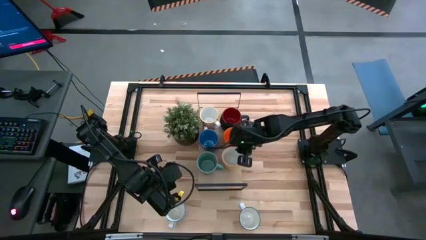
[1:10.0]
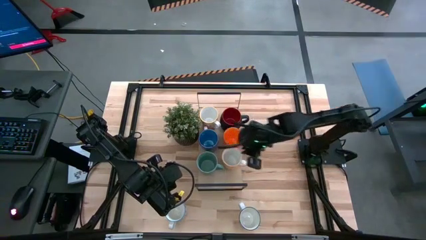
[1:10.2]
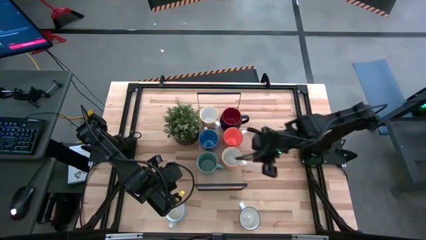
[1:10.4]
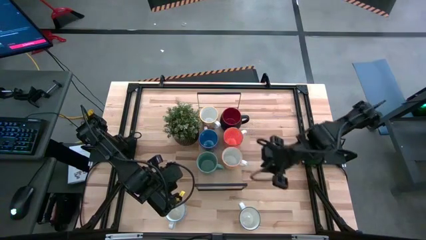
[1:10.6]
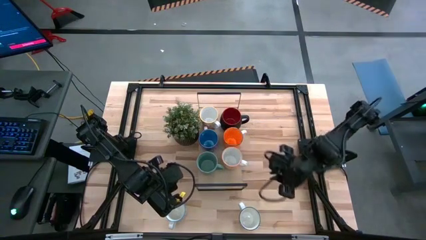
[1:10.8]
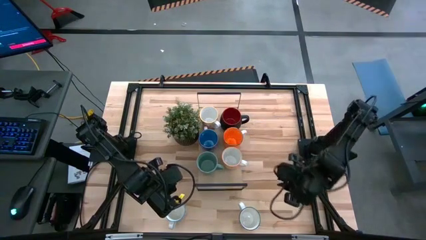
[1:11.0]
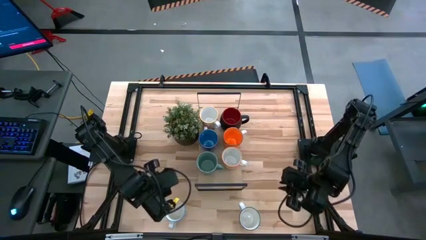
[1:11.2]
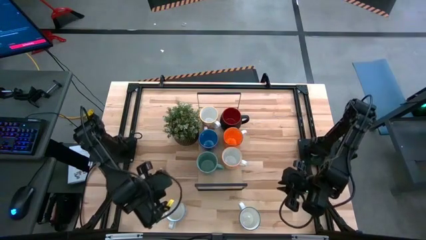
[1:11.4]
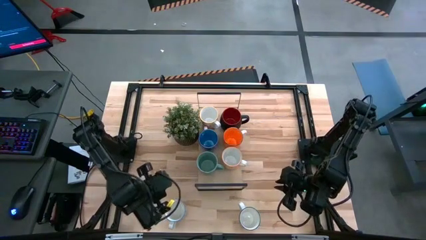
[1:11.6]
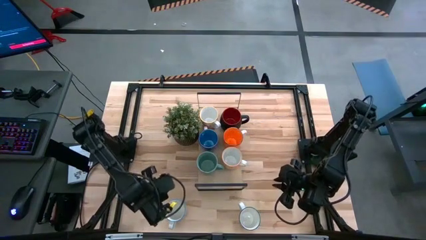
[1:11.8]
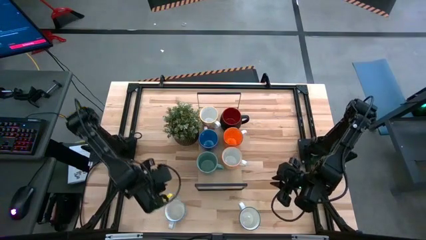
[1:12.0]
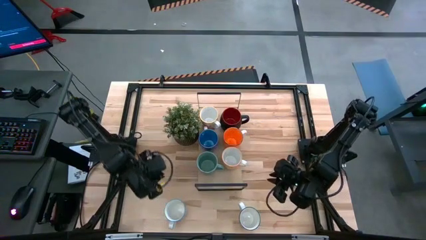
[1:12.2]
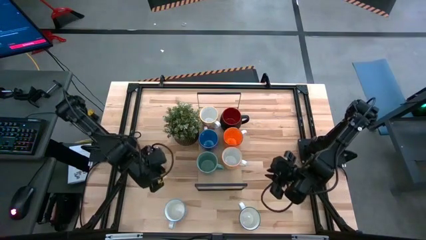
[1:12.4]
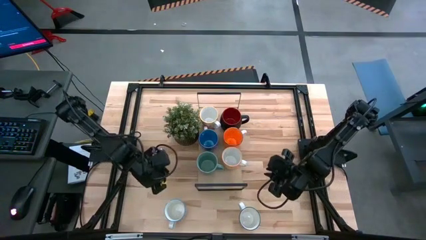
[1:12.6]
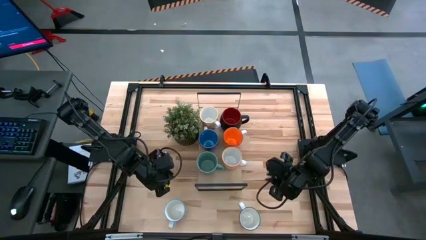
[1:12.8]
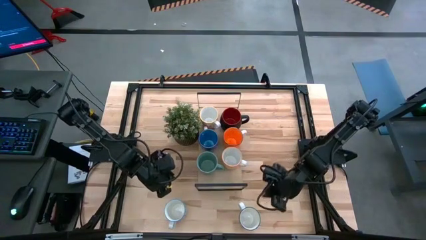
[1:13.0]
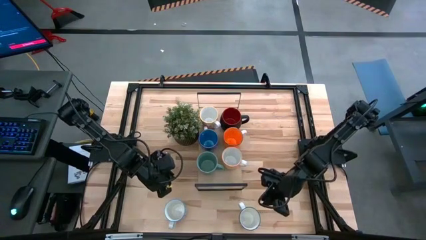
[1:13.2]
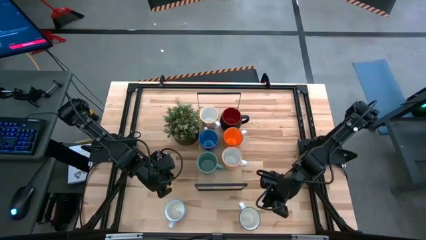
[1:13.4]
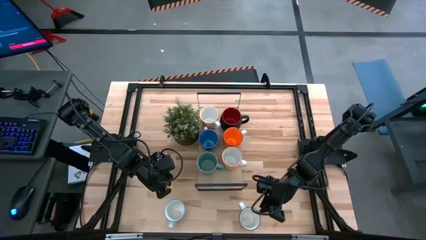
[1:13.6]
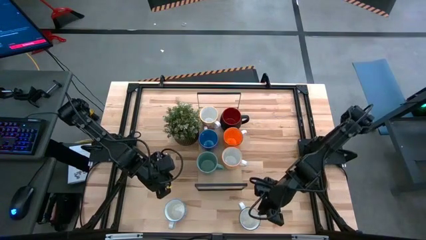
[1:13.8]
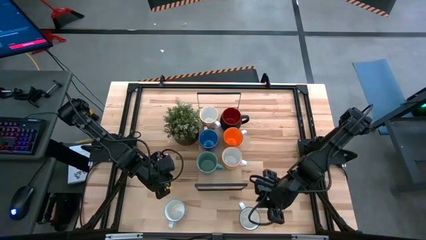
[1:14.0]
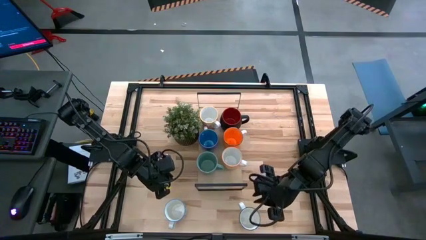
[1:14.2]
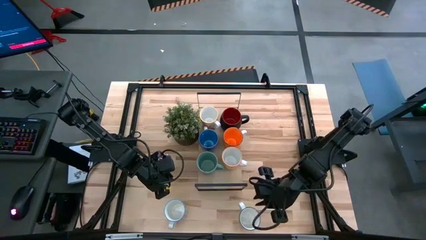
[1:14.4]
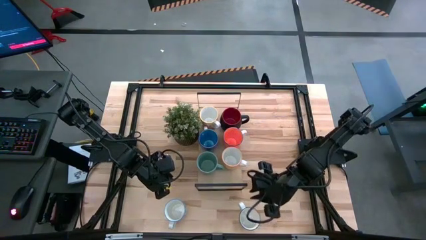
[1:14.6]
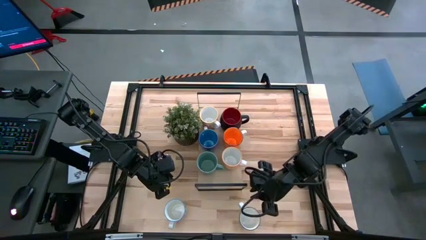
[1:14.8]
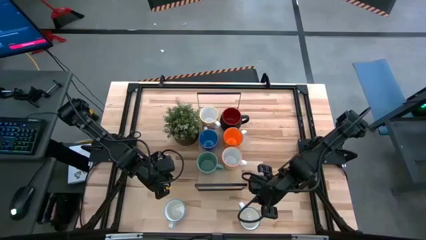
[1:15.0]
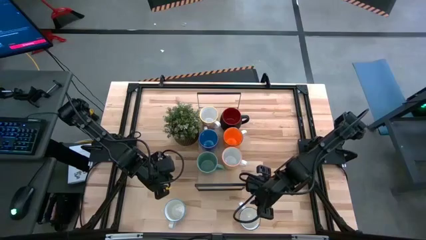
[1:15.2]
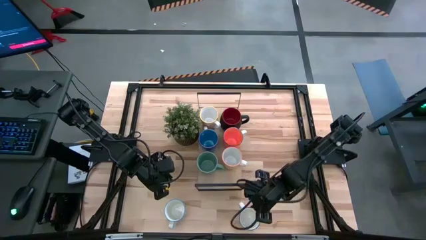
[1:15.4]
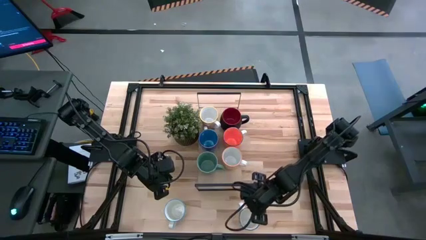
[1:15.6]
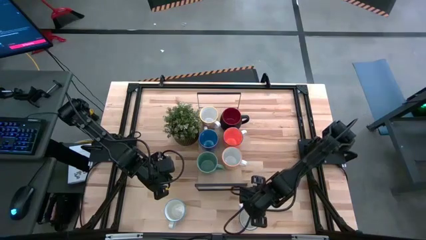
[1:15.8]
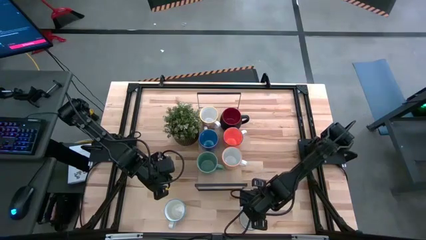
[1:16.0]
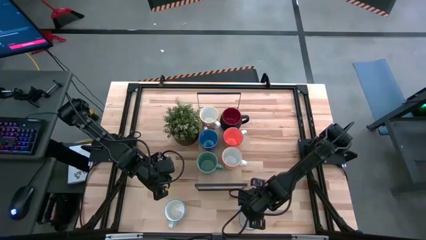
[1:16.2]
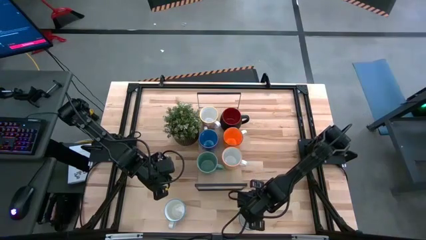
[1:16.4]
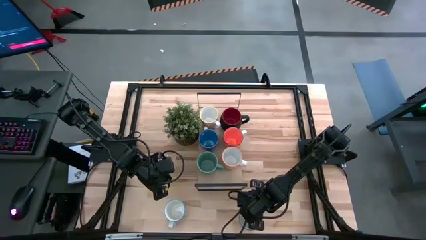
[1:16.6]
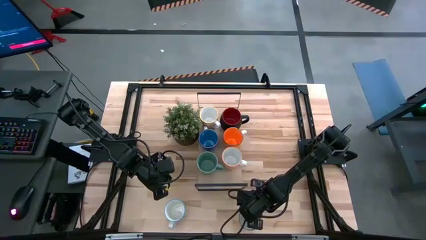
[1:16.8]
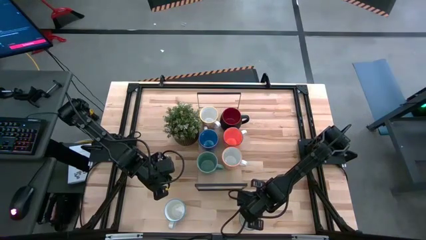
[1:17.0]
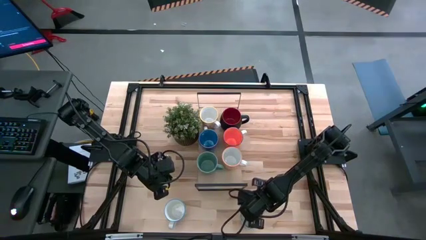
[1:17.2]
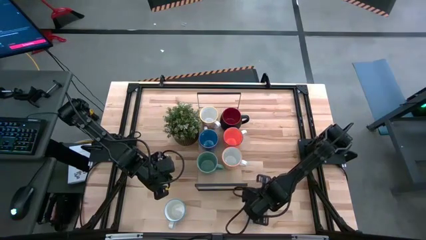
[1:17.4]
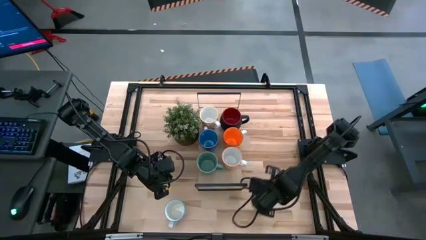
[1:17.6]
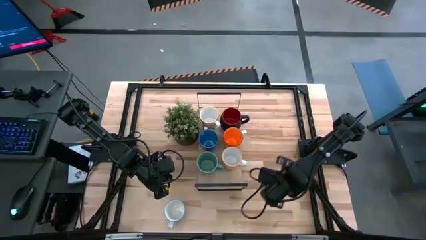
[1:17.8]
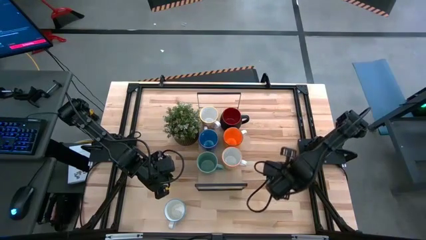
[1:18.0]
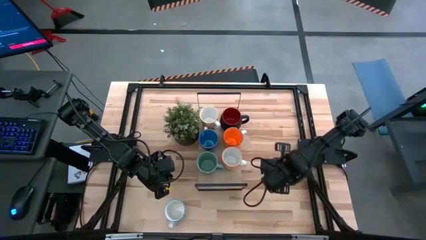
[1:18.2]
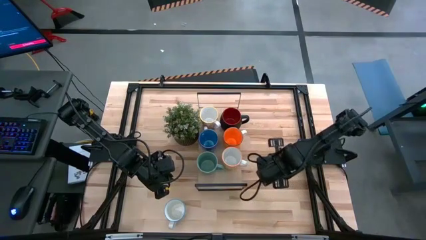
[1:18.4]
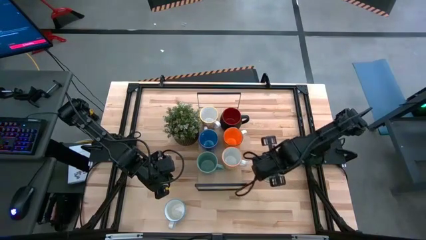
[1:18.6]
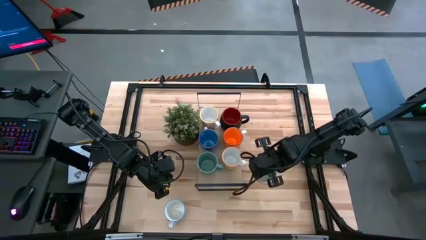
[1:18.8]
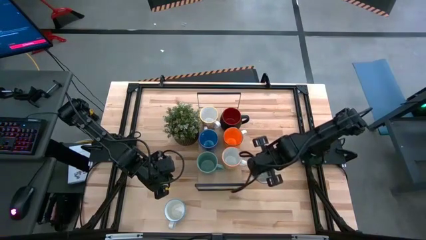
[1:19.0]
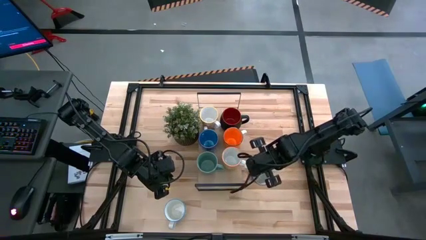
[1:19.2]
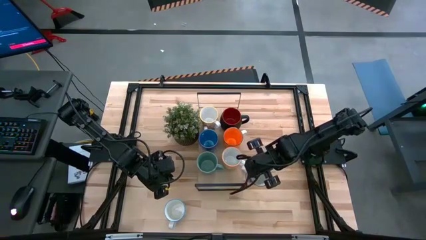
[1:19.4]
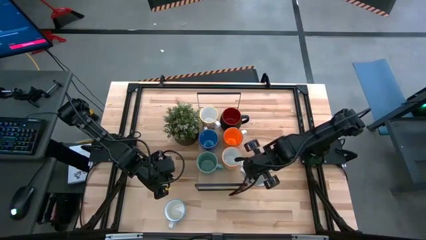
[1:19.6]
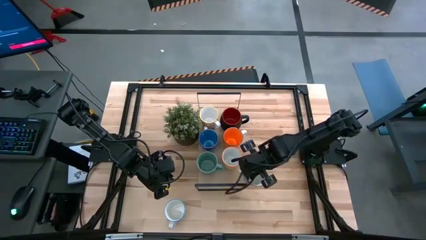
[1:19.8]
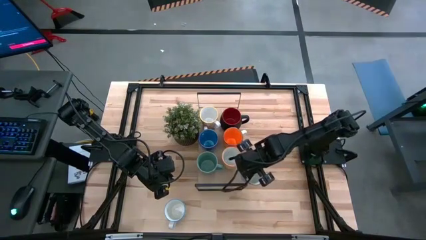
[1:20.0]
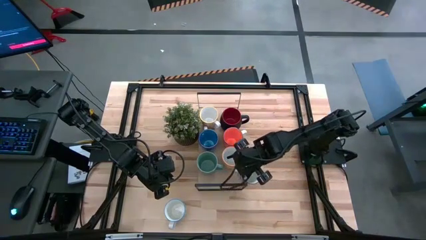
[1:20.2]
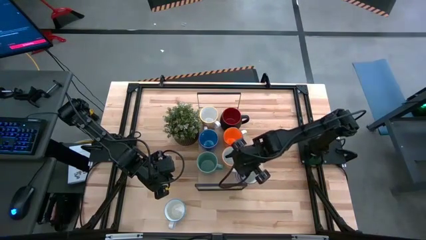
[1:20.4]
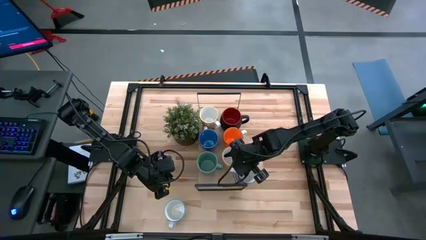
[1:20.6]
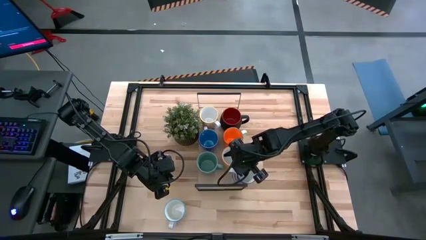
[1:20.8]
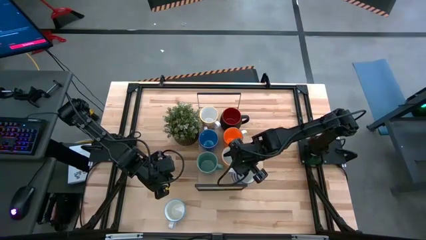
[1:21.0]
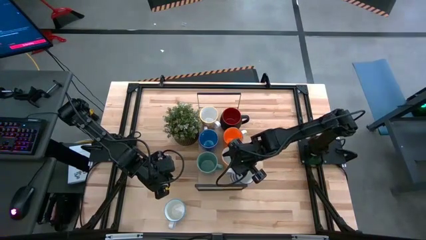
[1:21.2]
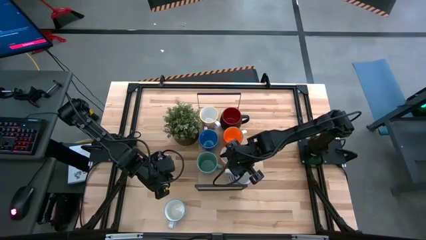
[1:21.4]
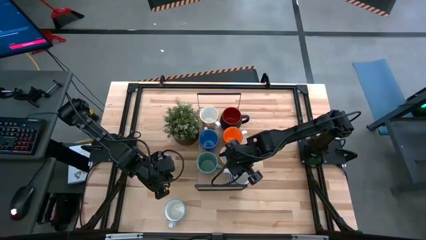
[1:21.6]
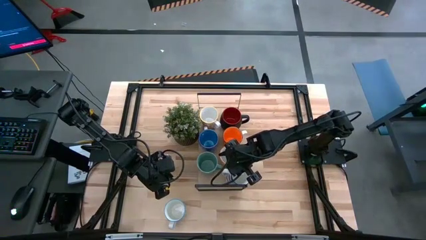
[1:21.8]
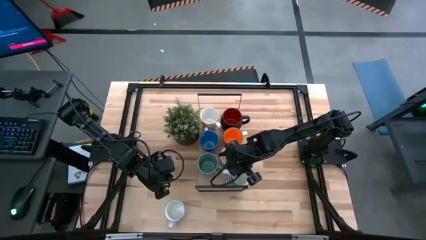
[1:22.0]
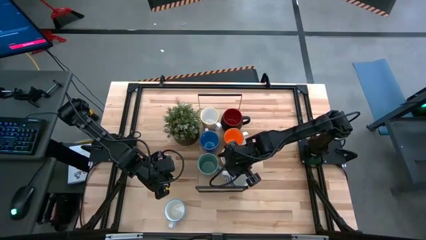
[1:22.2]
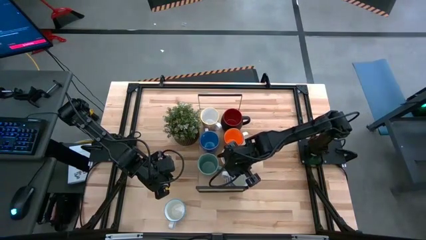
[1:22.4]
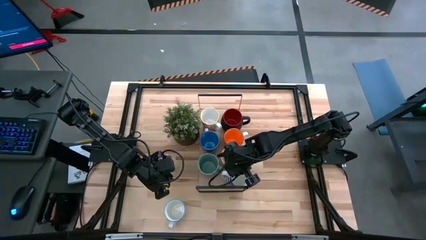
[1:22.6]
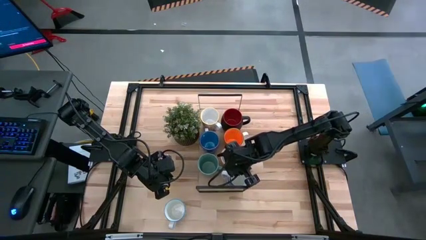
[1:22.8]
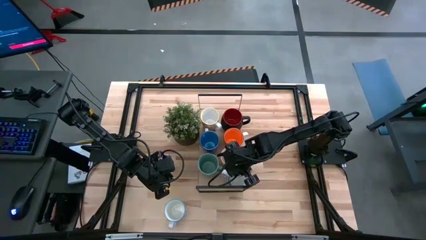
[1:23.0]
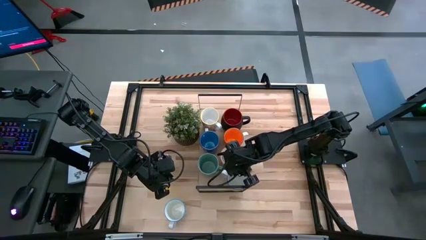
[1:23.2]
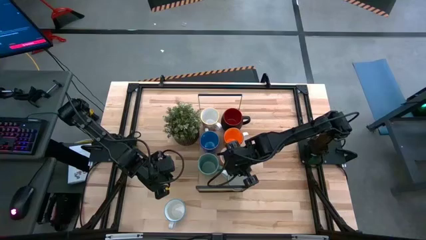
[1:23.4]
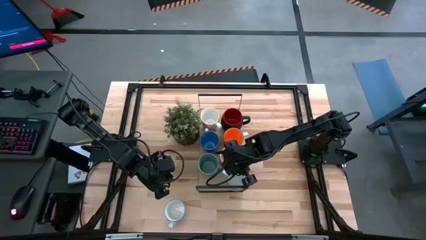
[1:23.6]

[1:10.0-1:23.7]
Task: Place coffee mugs
Put the patterned blue mug on the shelf

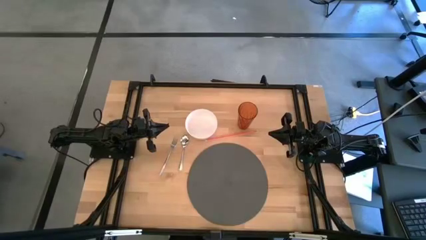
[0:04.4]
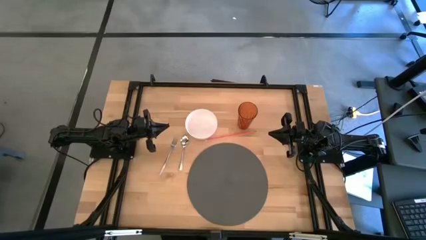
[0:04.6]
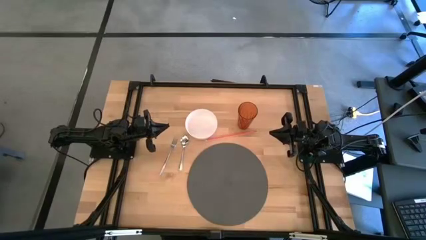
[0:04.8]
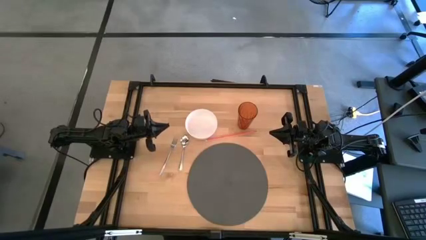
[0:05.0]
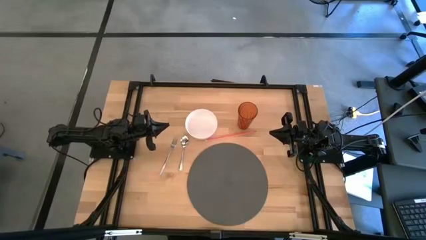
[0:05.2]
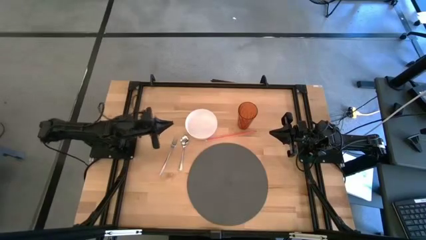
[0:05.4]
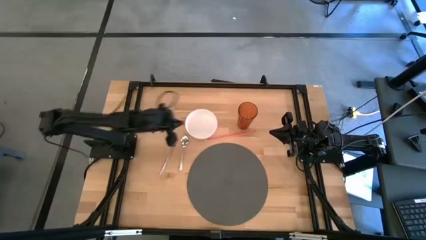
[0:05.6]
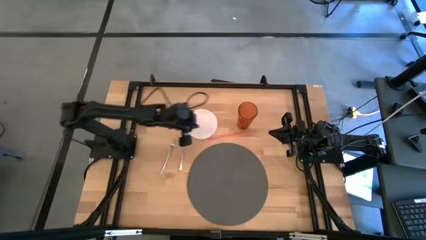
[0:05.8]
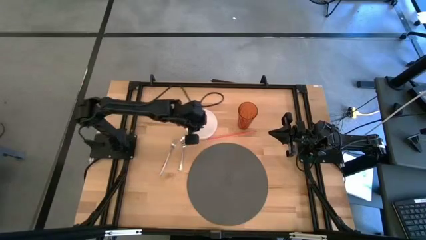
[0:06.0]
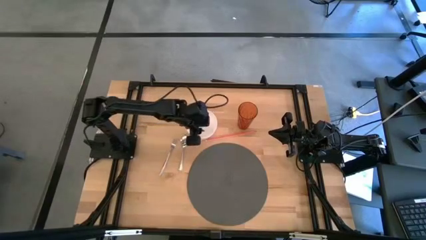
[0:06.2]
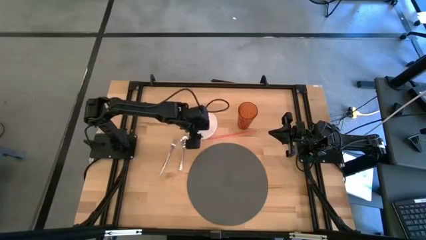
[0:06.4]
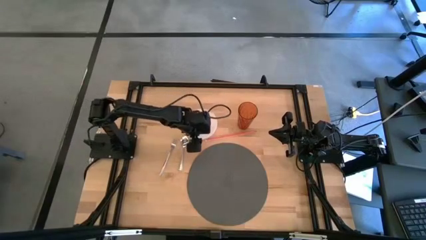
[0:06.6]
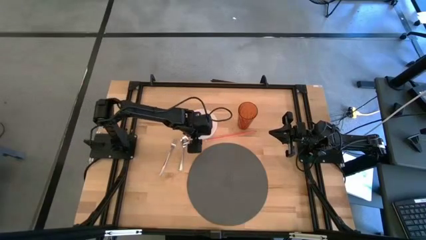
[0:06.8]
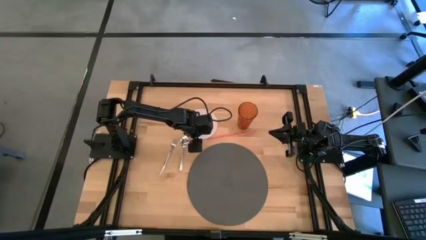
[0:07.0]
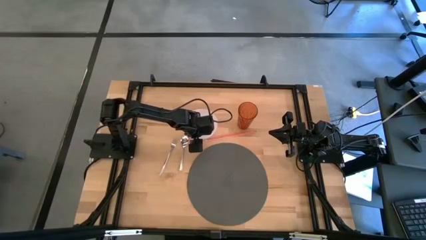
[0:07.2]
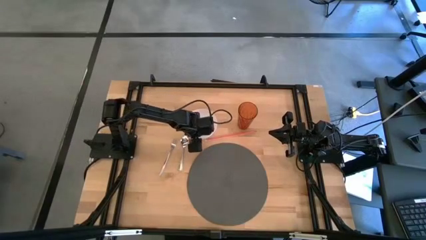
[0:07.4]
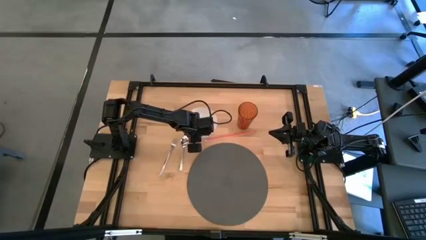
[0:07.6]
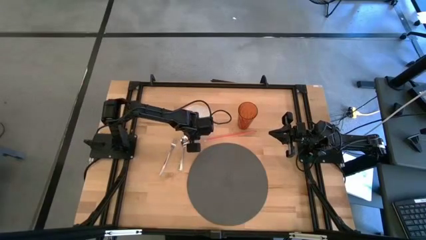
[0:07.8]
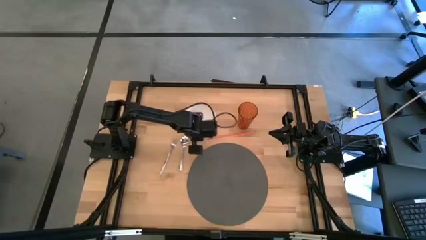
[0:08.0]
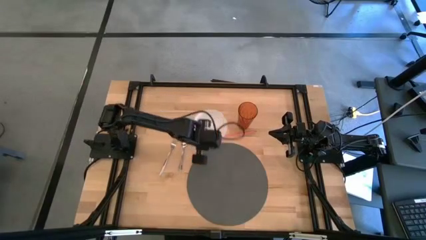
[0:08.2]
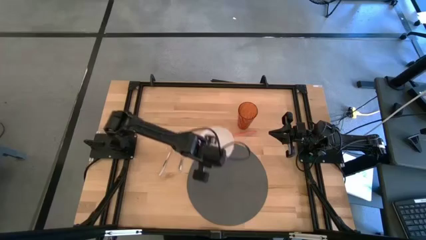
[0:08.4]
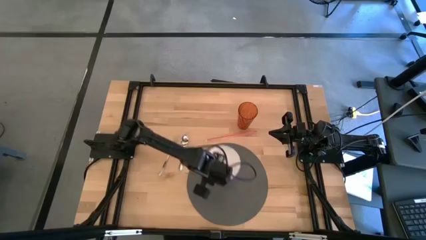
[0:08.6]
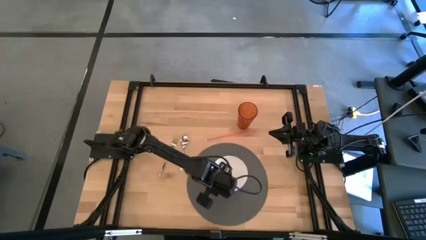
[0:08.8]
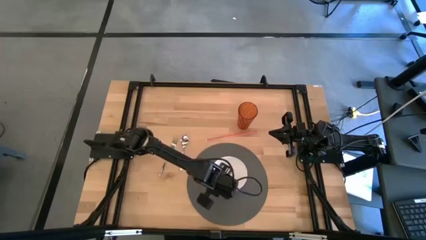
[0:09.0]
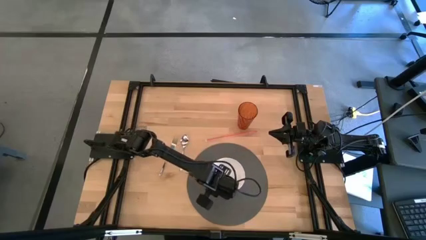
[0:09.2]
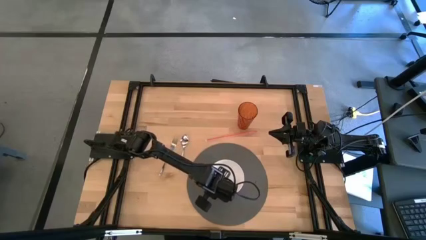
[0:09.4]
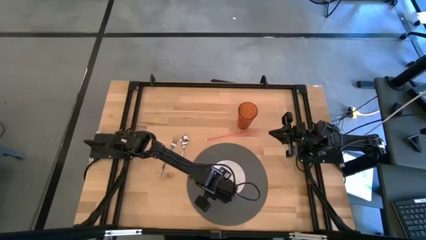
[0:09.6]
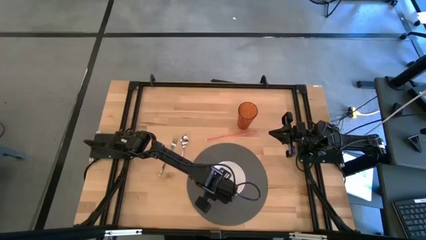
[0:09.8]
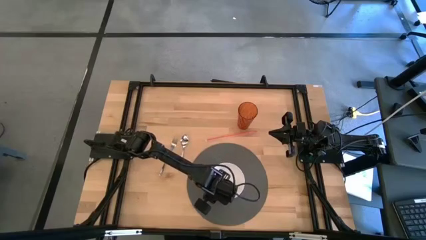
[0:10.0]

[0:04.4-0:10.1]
Task: Pick & Place Utensil
Put the bowl on the mat
